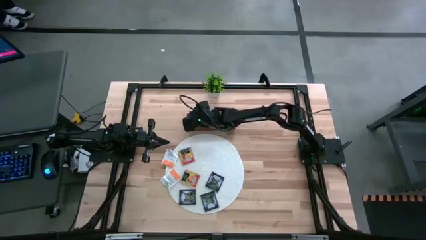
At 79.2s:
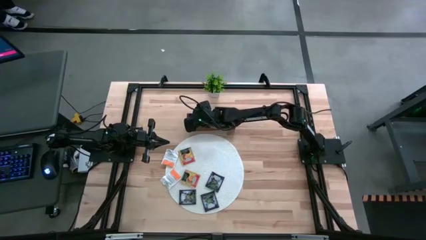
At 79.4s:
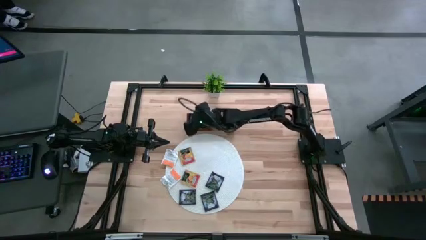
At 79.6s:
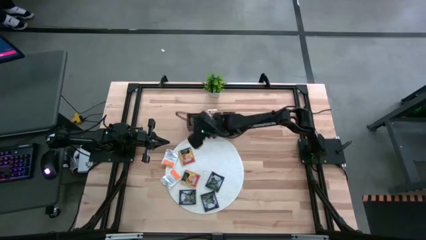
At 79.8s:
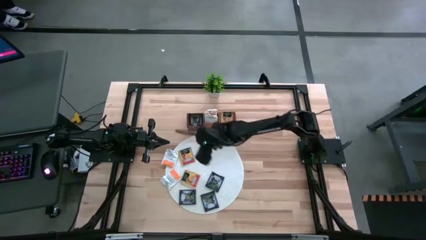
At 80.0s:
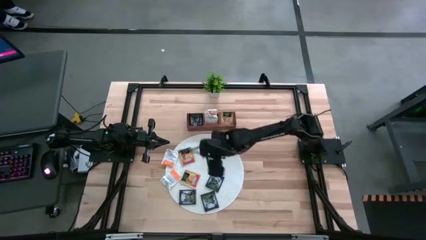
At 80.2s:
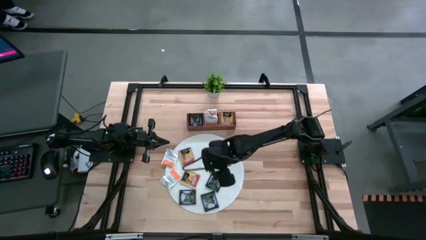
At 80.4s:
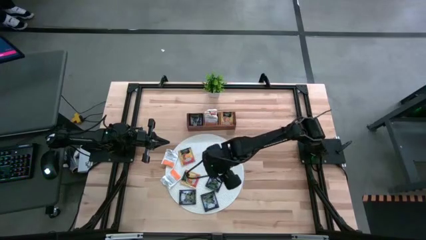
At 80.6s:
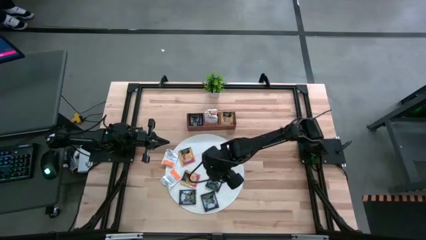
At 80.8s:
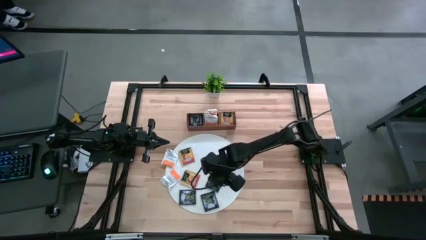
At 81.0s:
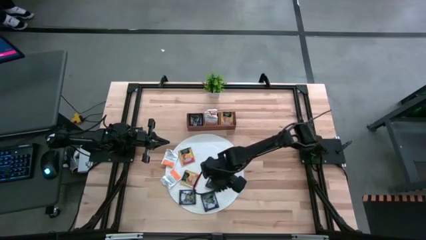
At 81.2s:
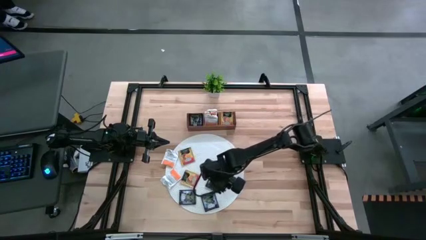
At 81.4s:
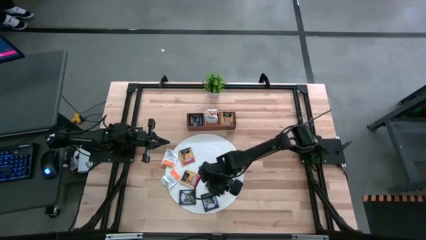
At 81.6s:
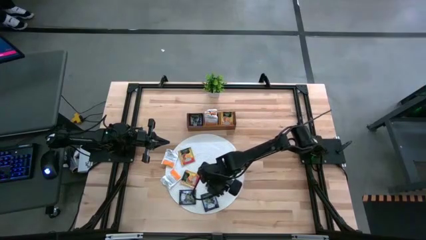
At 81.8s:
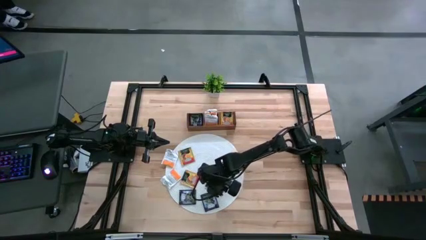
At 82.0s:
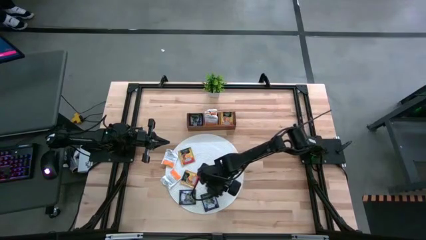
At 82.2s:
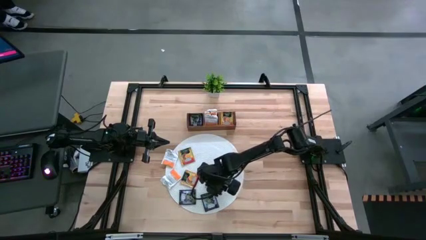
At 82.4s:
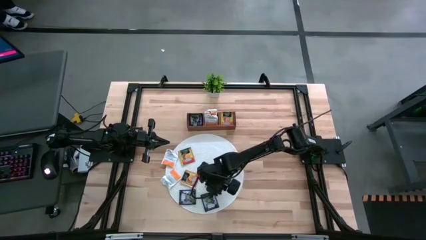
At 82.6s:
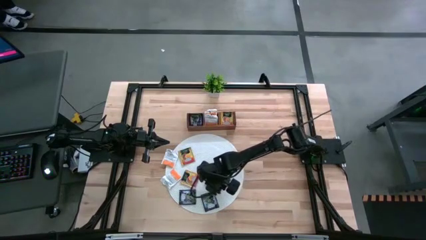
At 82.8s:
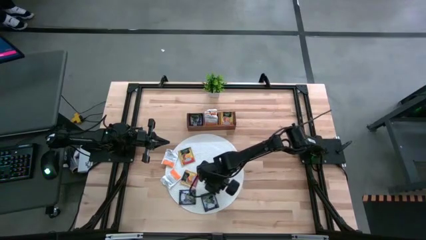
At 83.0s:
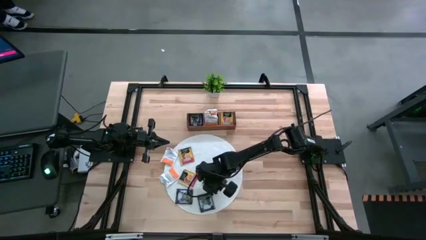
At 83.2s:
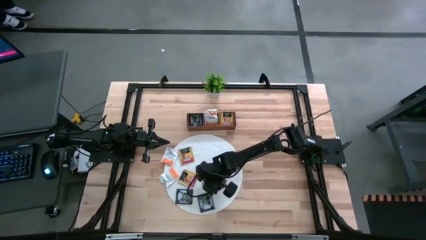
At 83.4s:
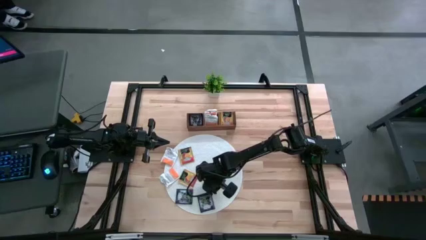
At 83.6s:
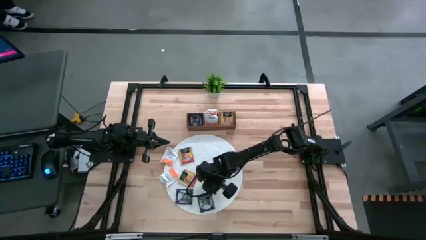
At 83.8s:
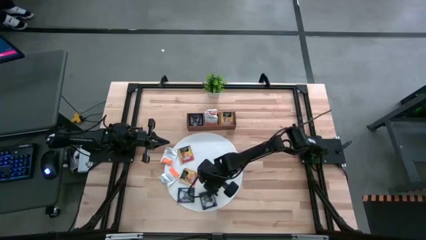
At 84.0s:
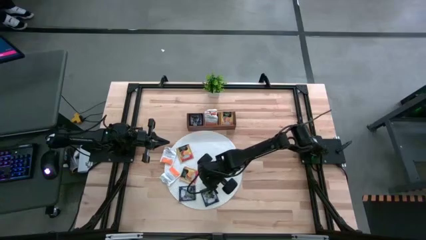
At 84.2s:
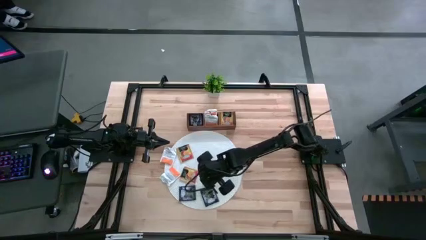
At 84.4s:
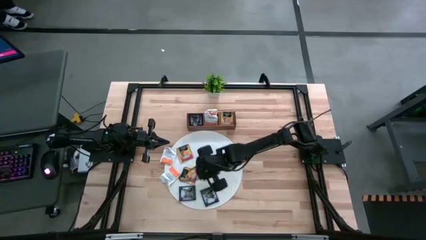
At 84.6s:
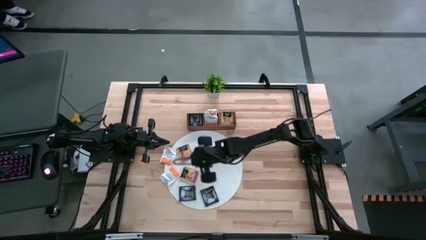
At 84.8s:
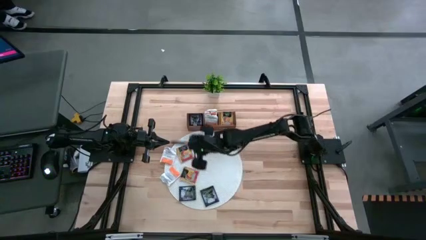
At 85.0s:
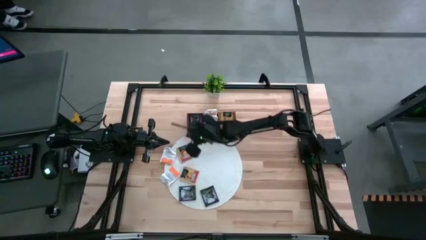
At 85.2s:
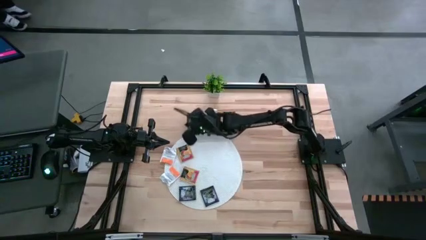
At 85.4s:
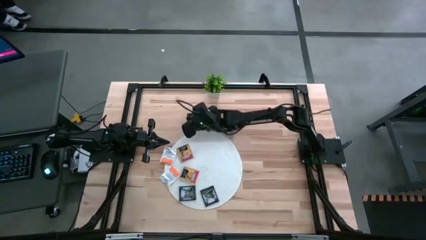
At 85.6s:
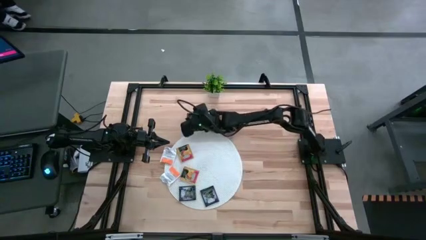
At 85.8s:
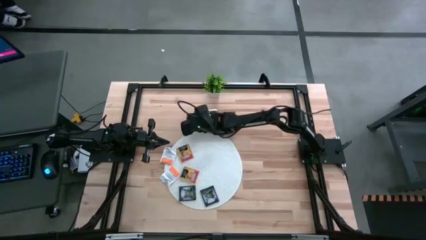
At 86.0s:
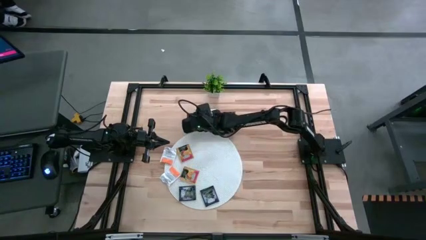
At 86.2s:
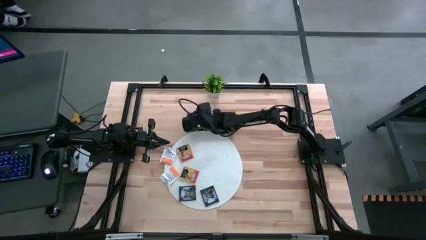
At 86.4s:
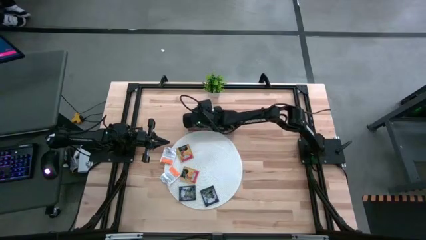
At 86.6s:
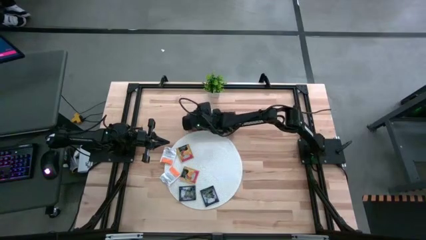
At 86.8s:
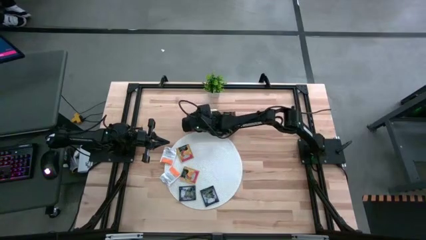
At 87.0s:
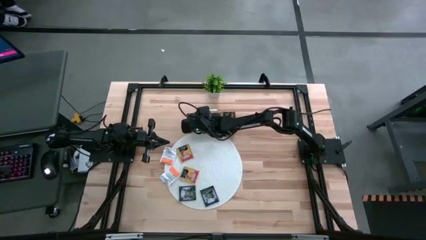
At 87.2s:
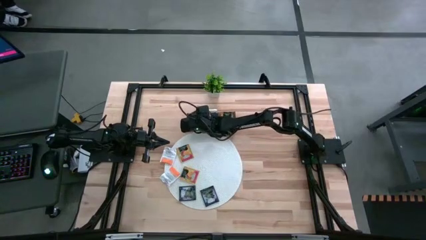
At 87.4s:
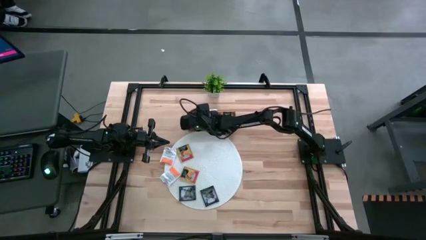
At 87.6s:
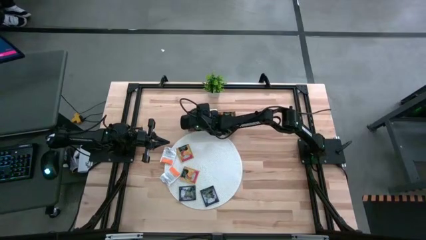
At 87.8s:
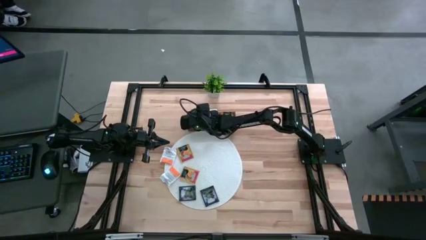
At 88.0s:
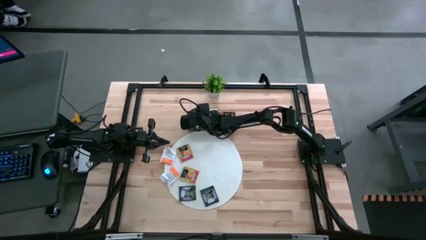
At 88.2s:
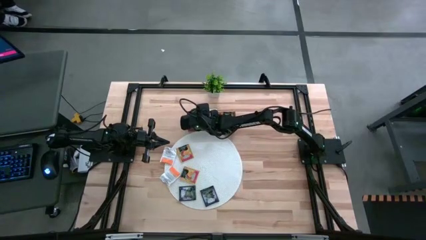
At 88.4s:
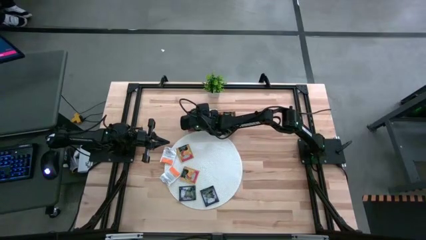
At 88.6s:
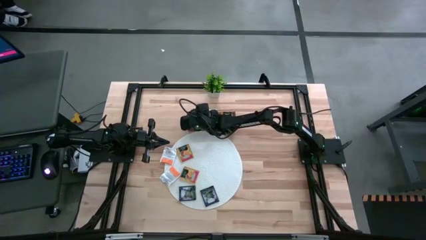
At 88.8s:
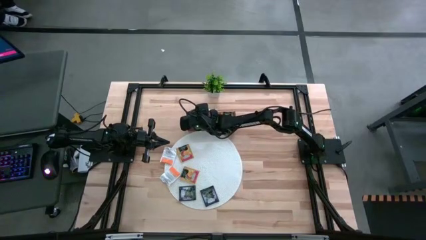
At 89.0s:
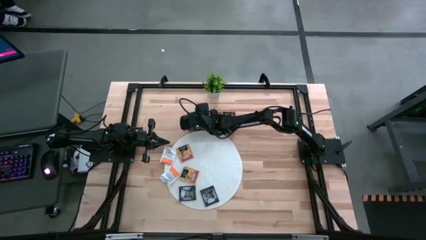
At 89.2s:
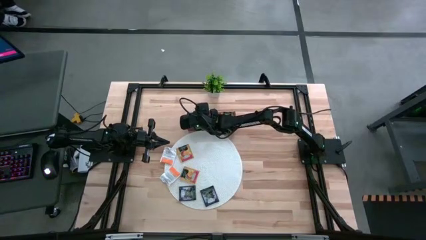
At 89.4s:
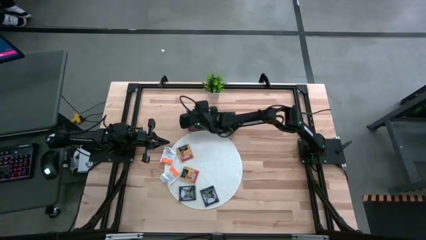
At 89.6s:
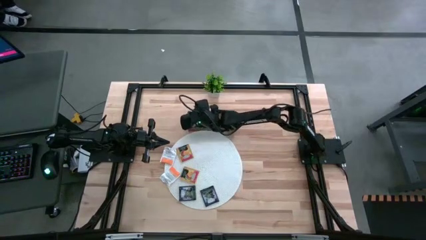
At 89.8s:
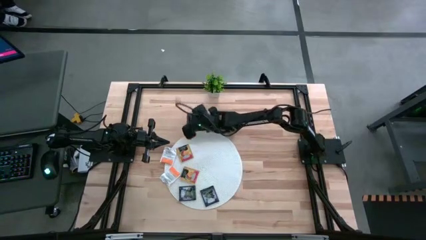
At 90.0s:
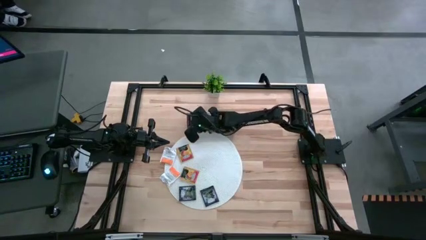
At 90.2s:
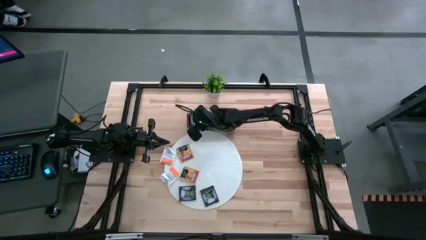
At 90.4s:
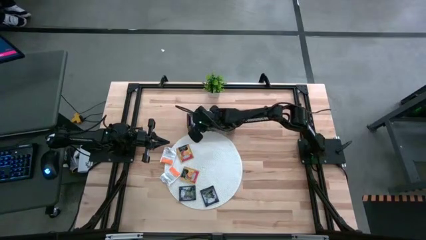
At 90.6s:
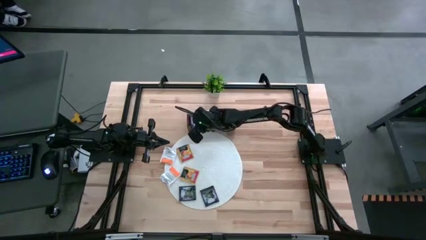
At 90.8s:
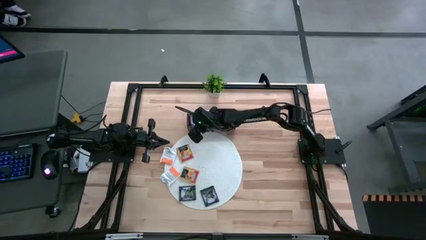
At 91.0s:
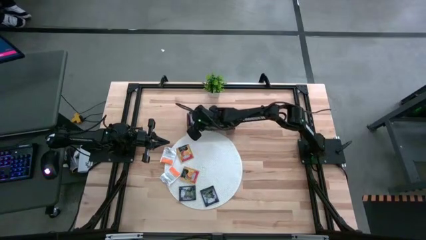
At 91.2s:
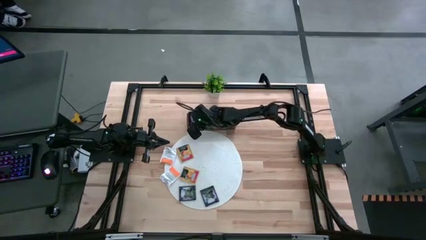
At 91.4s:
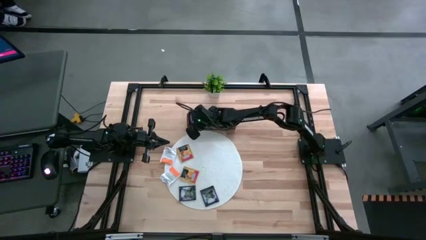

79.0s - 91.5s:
Task: Pick & Place Tea
Put the dark purple tea bag into the left section of the wooden organizer

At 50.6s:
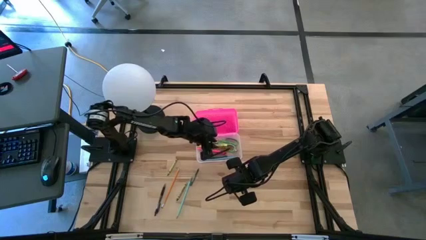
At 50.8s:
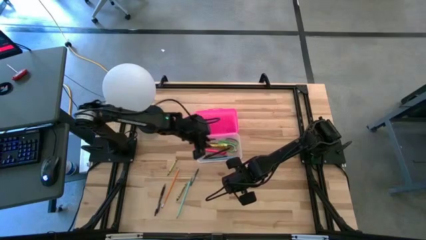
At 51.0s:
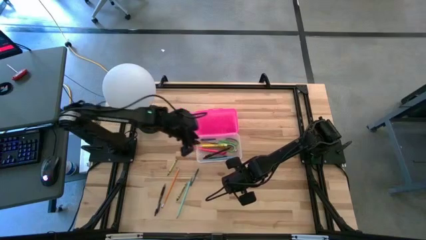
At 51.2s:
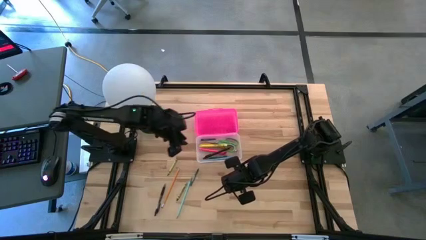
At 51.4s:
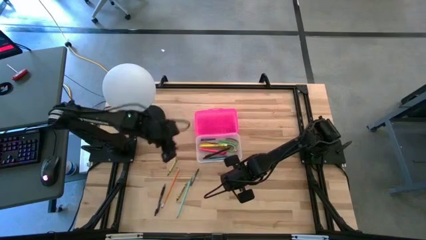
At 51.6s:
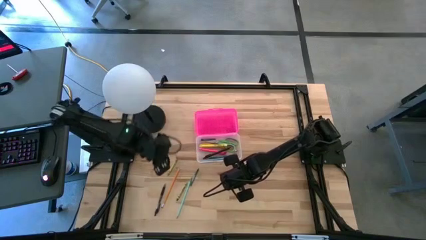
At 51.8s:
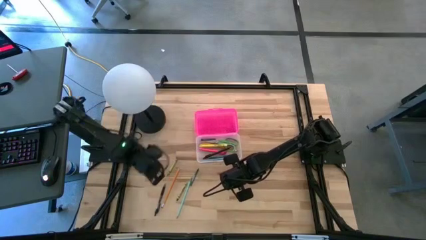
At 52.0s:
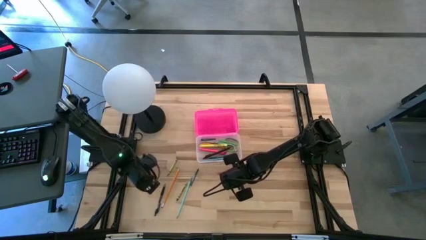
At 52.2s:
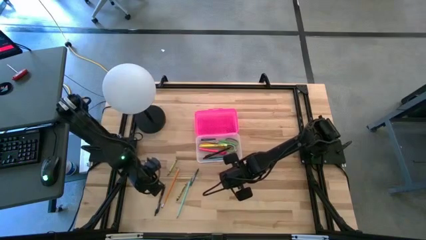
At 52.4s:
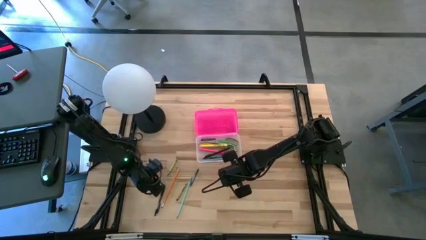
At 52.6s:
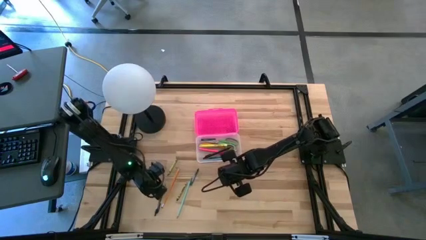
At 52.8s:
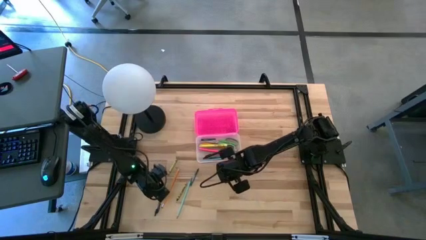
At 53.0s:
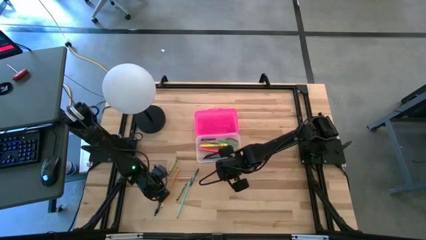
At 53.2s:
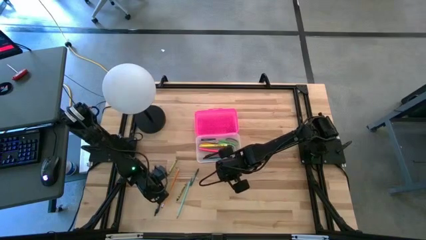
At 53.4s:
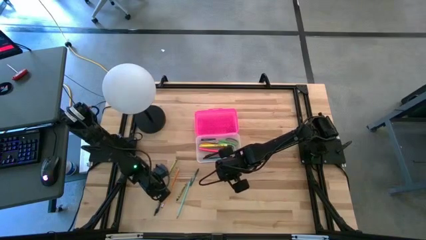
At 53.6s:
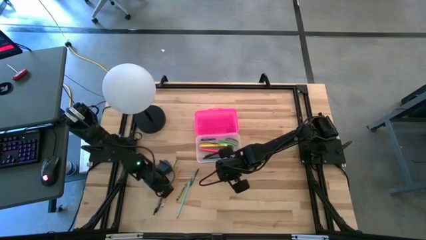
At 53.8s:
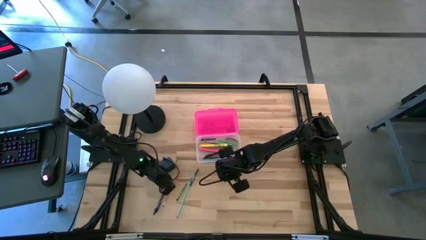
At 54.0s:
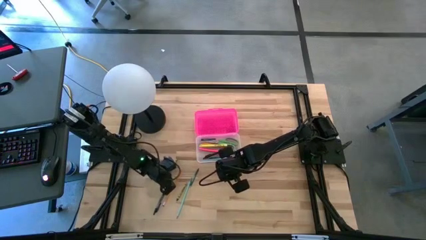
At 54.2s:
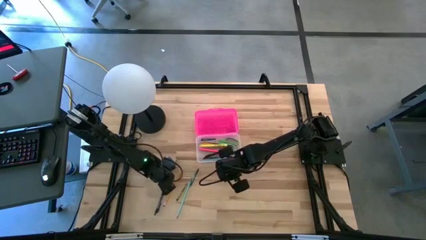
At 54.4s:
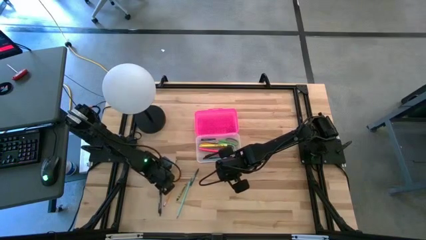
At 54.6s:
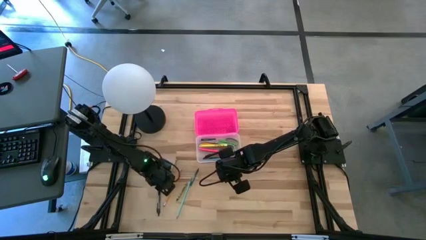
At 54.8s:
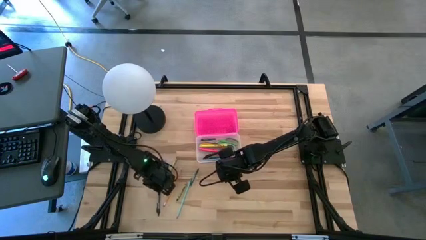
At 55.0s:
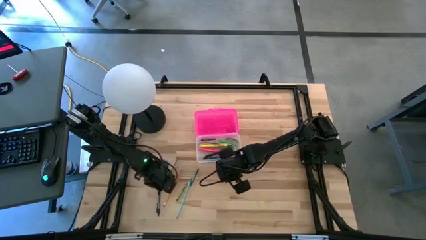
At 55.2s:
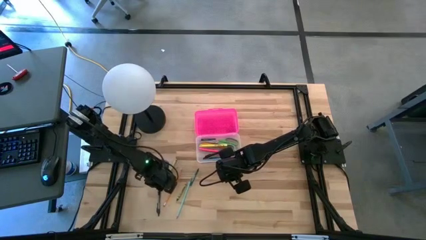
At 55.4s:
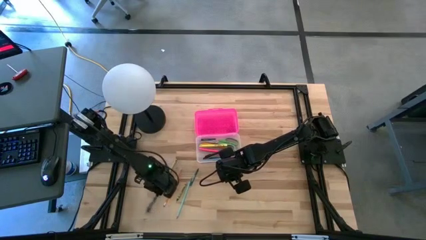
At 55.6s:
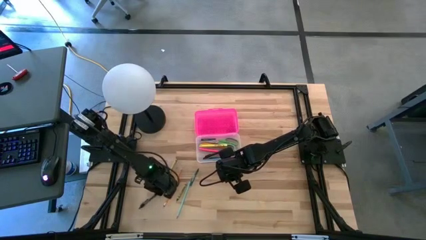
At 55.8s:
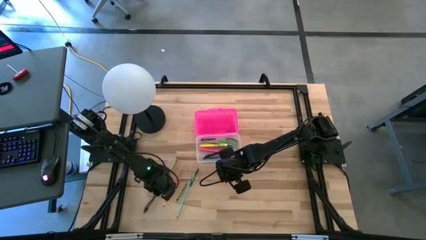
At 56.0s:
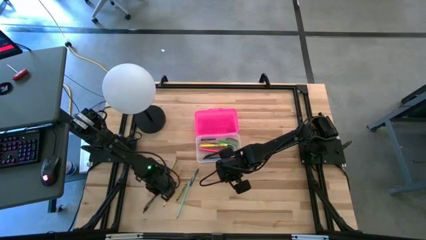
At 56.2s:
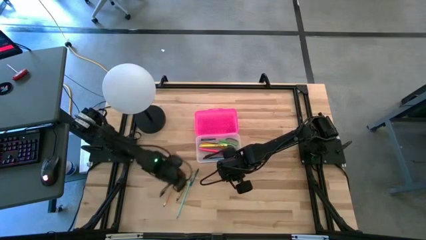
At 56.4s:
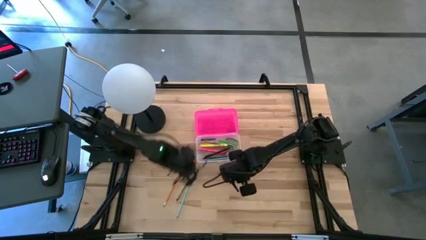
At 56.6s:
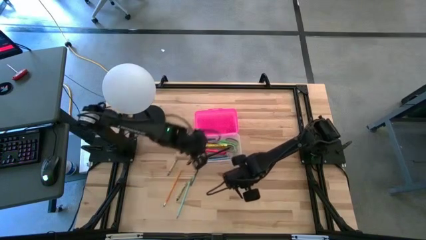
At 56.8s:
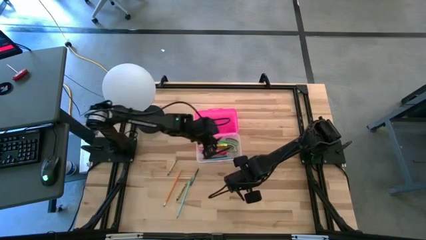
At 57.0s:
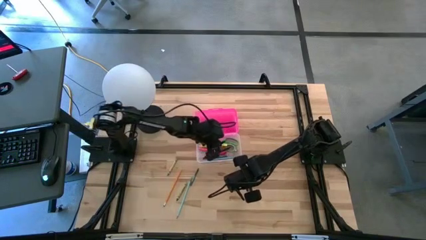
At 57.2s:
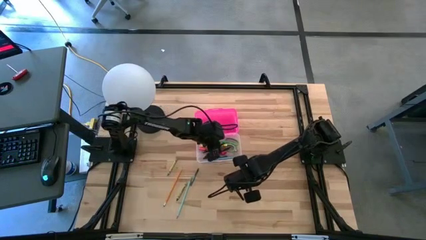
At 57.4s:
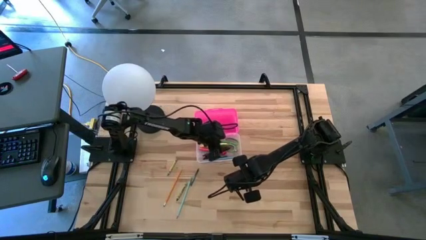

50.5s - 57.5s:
Task: Pick & place school supplies into a supply box
Put the black pen into the pink supply box
